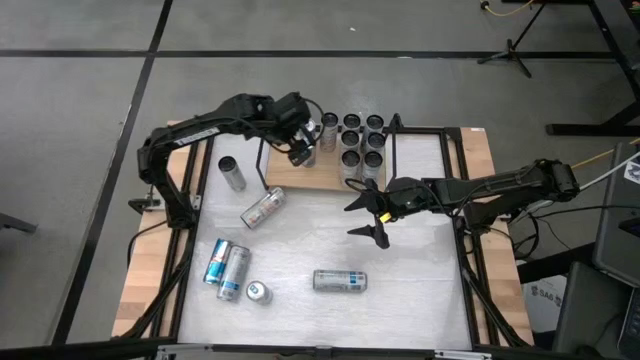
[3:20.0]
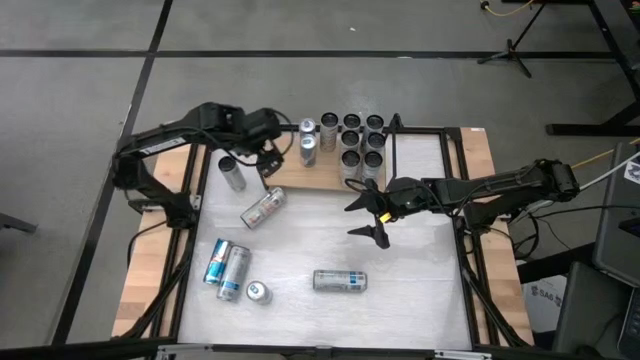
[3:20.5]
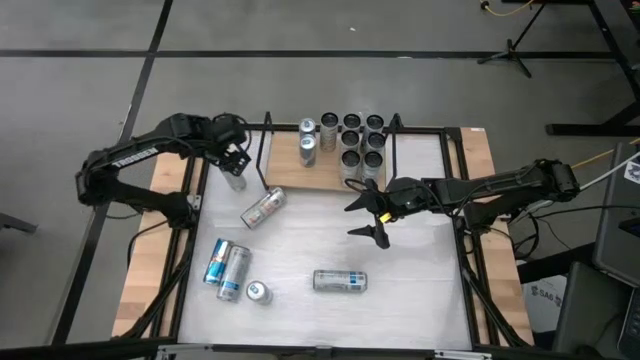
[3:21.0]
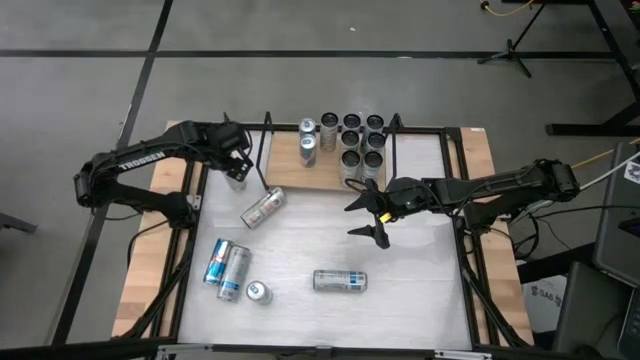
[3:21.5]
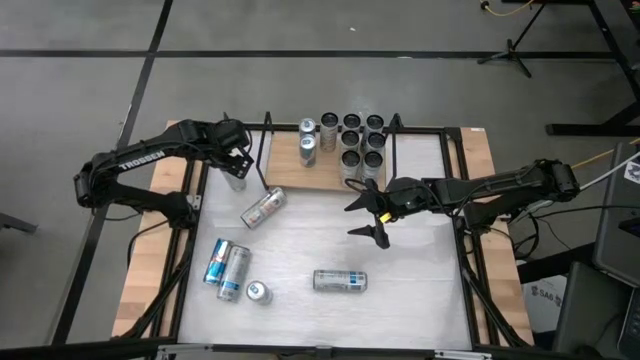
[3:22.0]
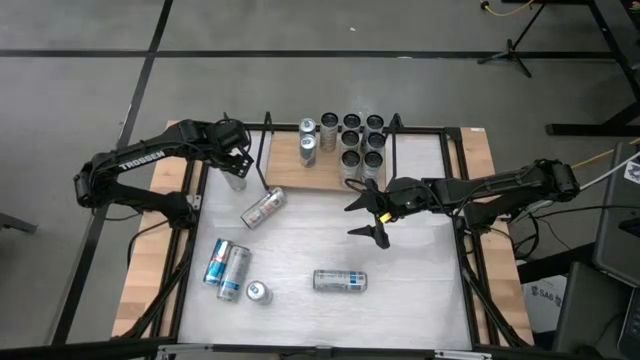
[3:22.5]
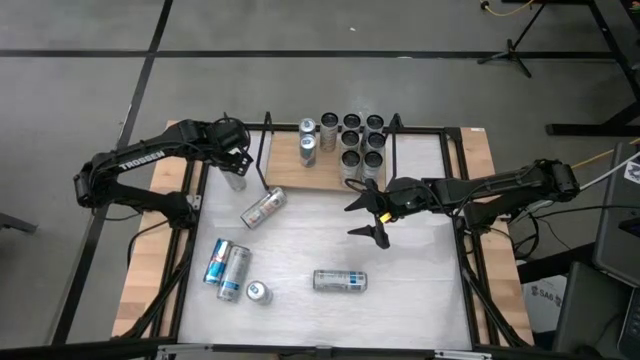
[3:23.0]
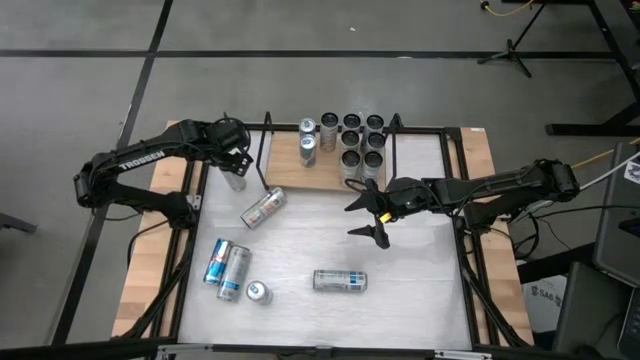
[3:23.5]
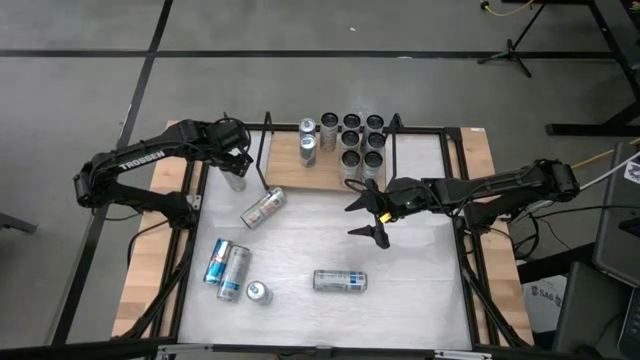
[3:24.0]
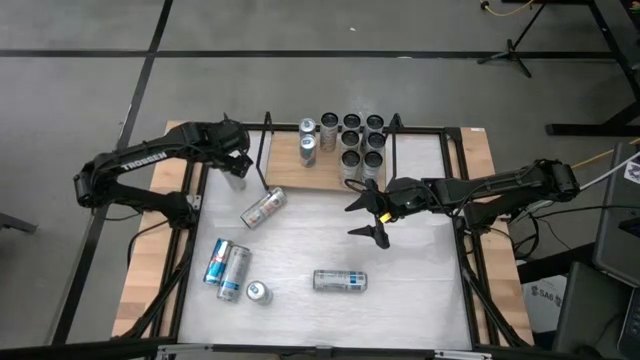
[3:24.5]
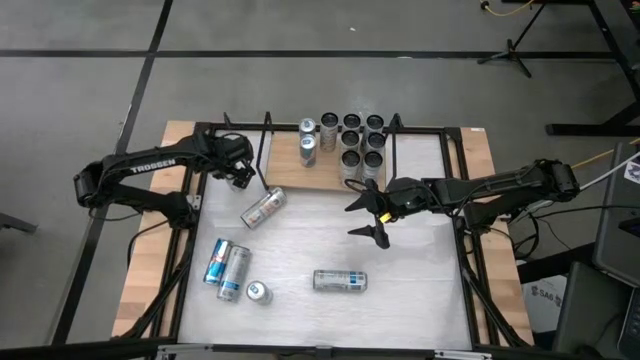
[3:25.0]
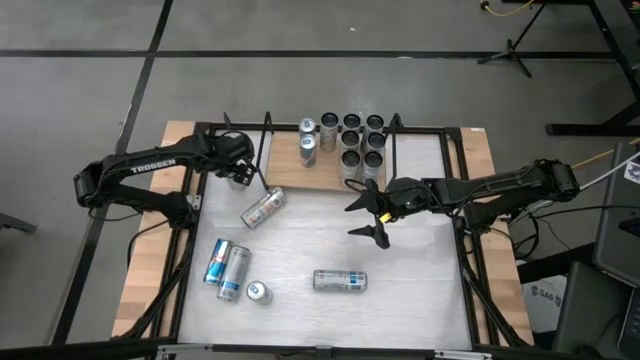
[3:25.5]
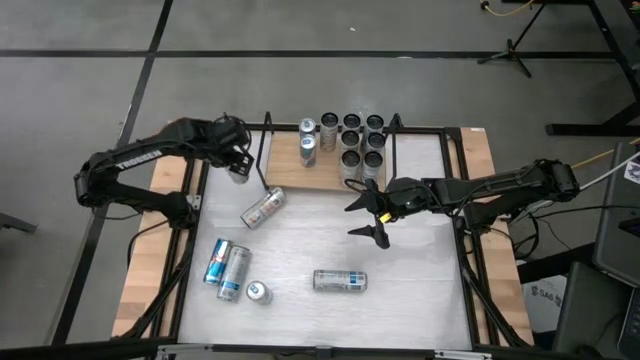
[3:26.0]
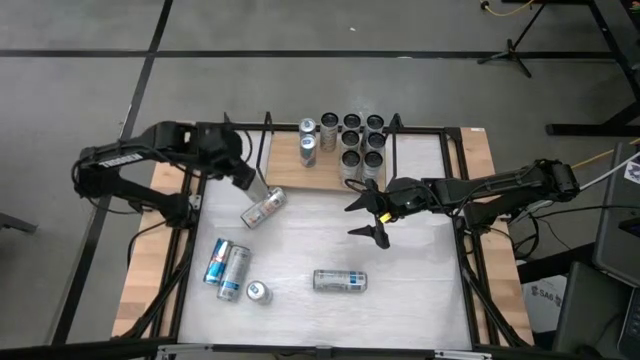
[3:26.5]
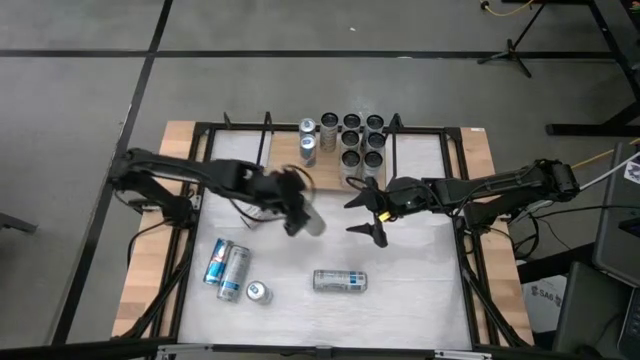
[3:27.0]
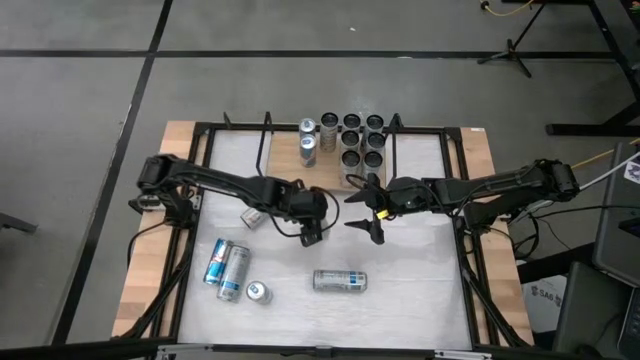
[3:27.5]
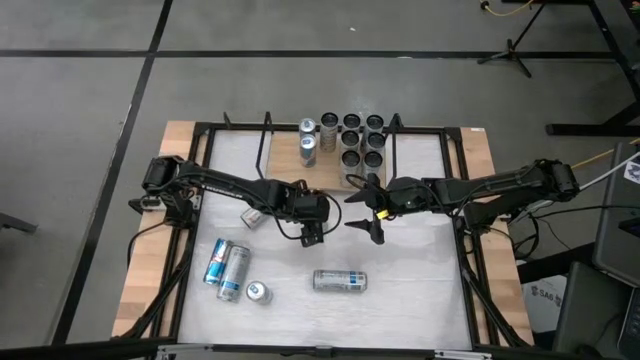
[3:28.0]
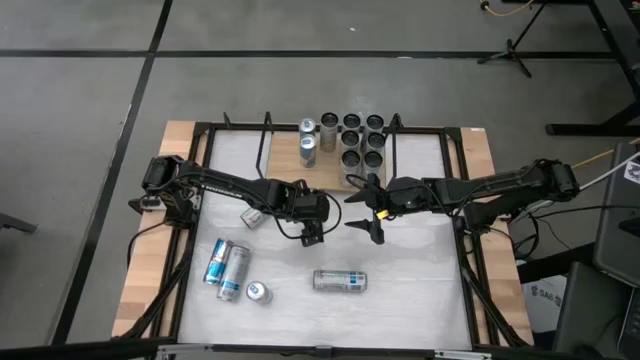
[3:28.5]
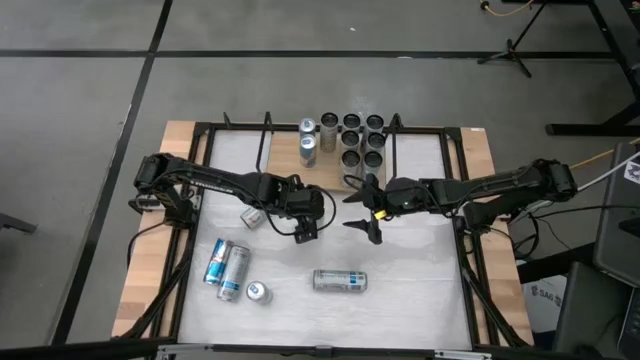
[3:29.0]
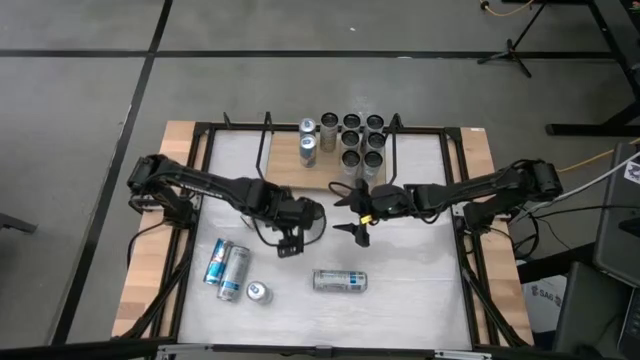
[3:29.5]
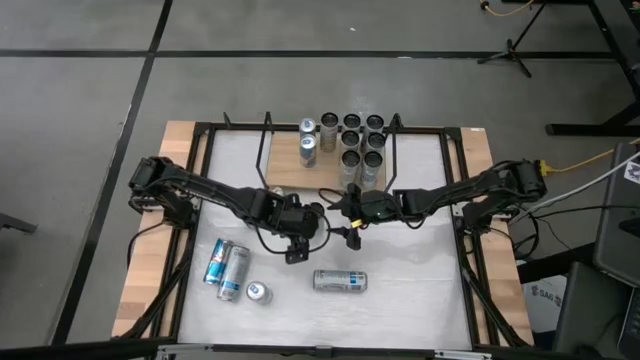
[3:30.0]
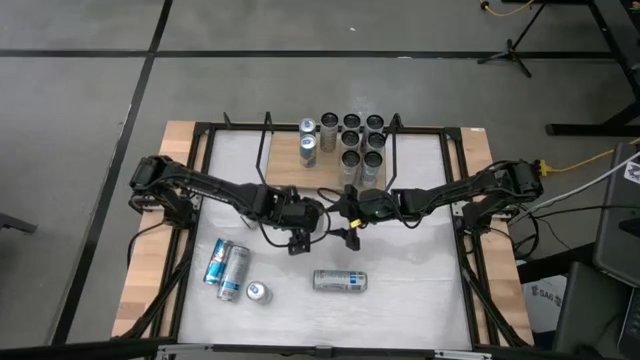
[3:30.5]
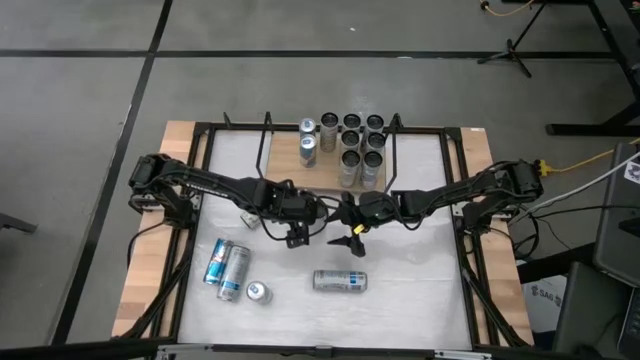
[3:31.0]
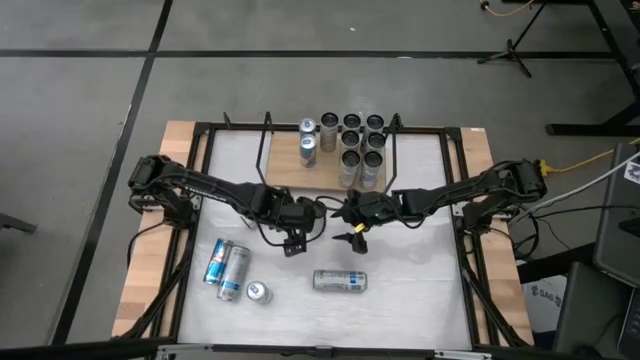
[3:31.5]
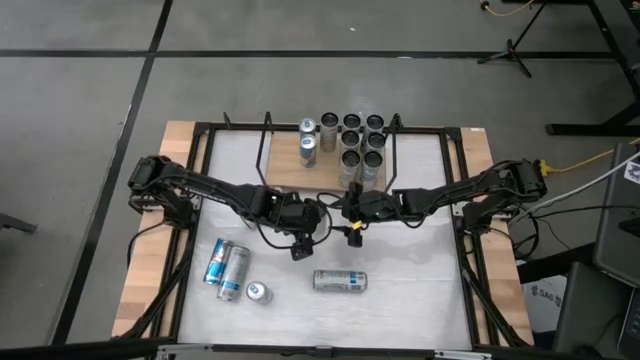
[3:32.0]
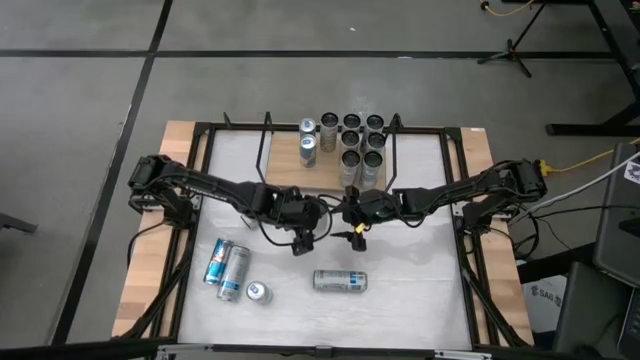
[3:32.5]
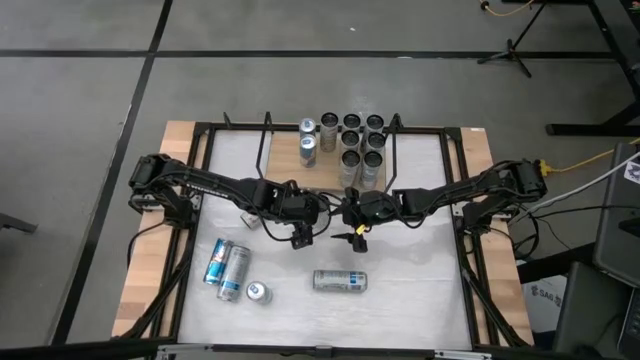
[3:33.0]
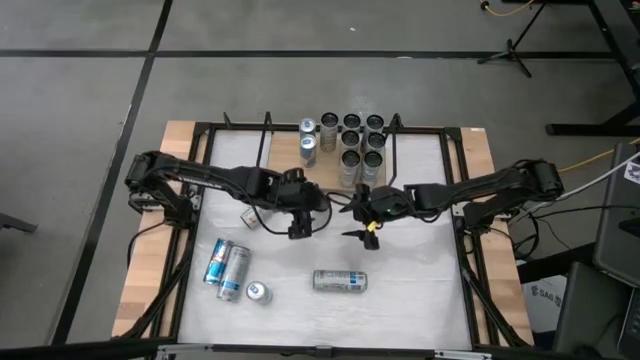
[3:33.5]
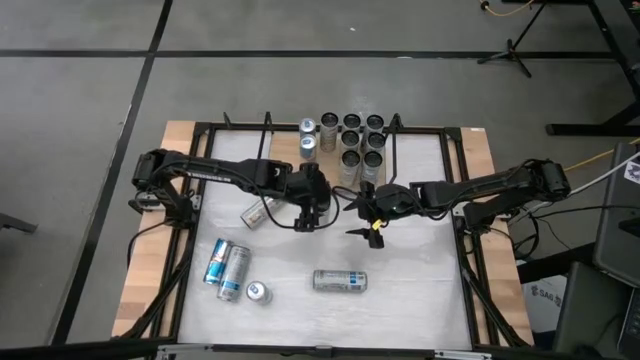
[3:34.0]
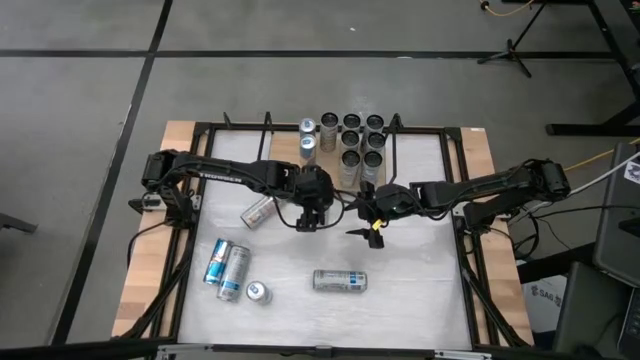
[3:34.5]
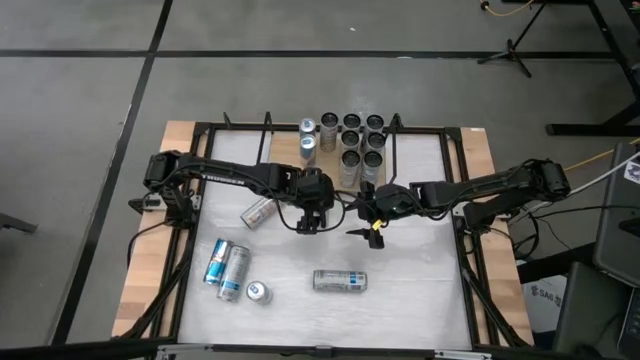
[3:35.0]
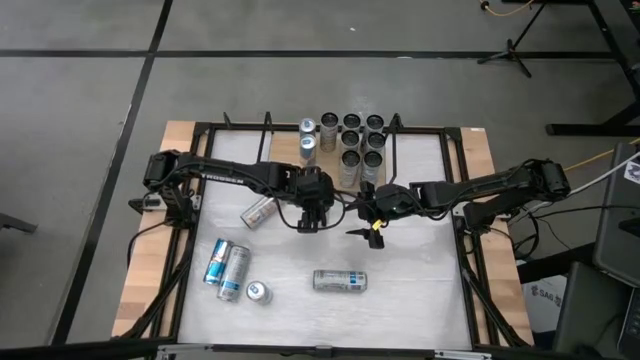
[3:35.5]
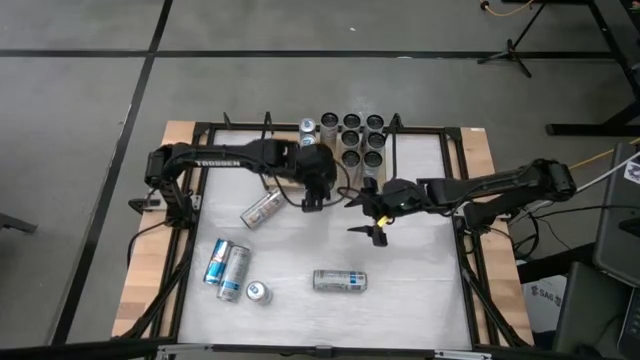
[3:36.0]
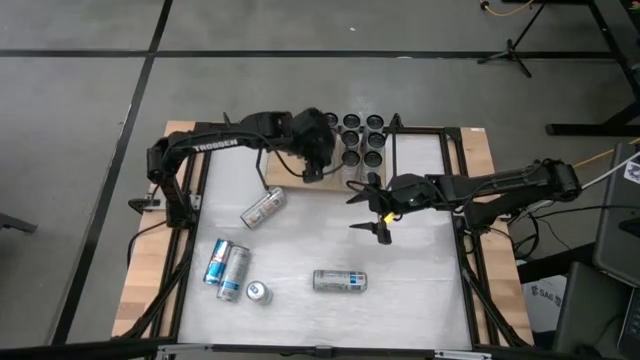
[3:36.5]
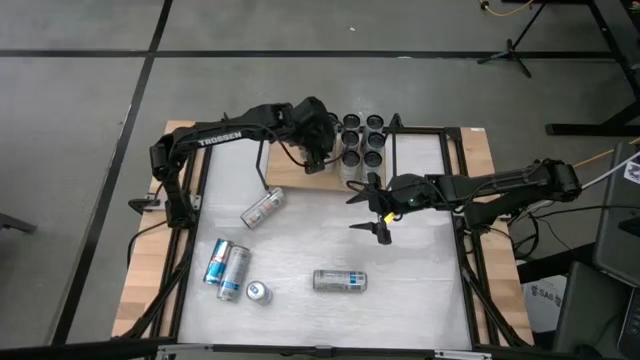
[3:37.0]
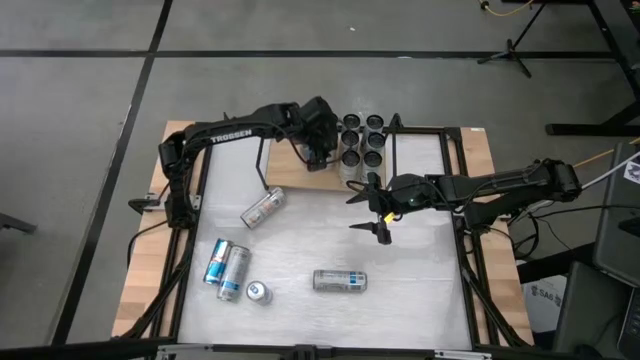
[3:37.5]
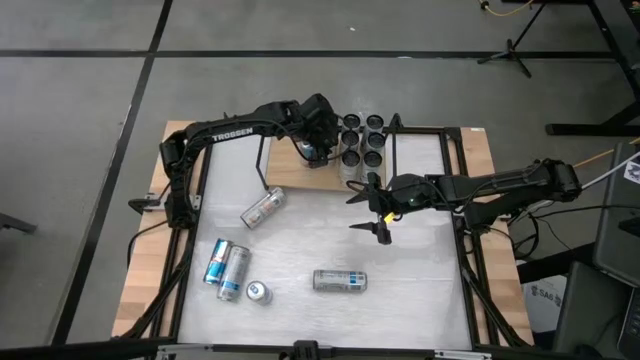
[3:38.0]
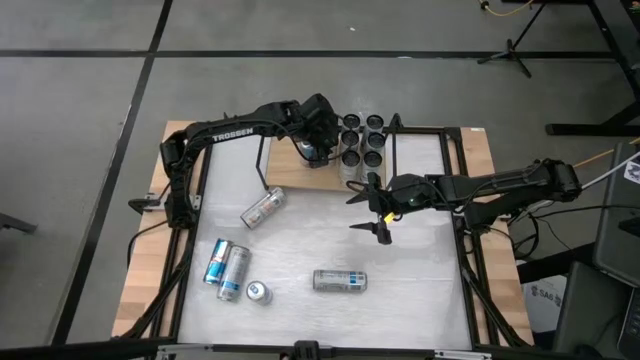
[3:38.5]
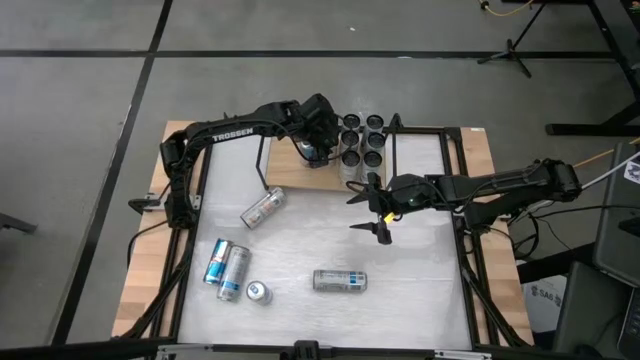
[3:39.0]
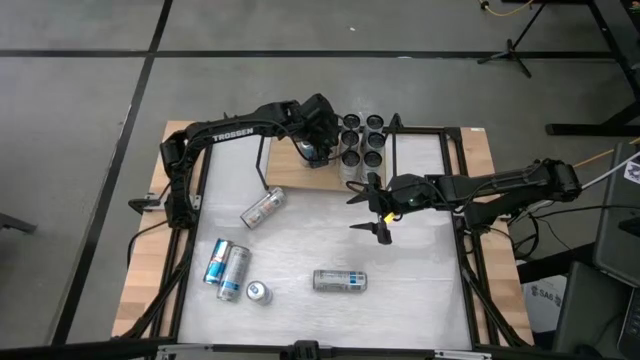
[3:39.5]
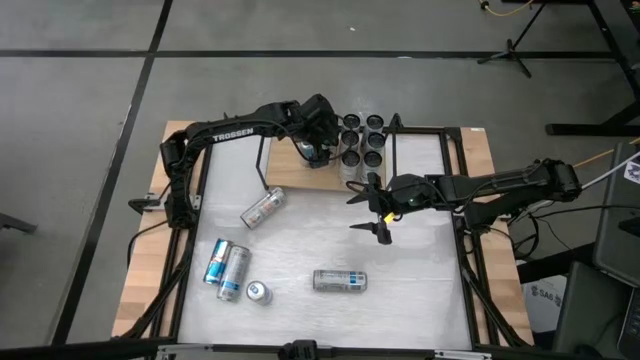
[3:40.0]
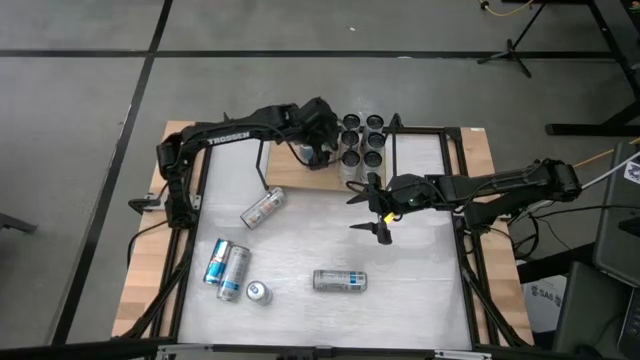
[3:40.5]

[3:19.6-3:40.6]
Task: Place canned beverage on shelf
Put the white soda can aligned with the other white soda can on the shelf

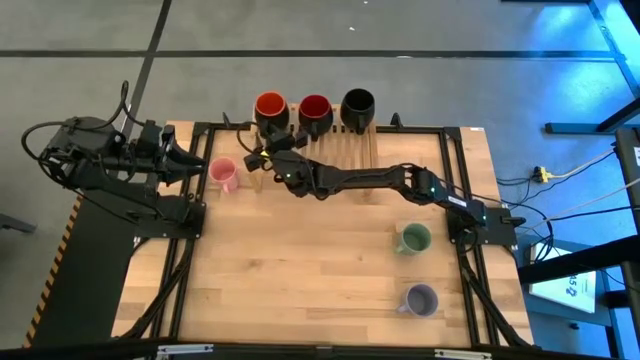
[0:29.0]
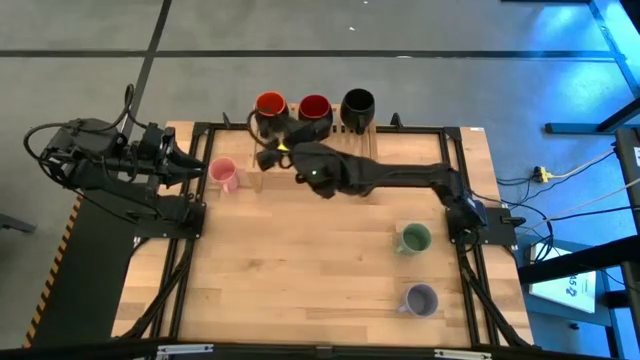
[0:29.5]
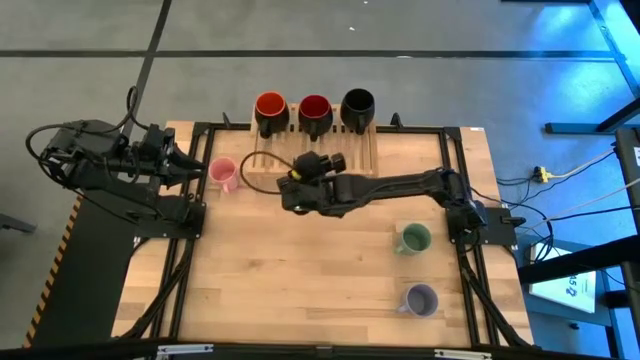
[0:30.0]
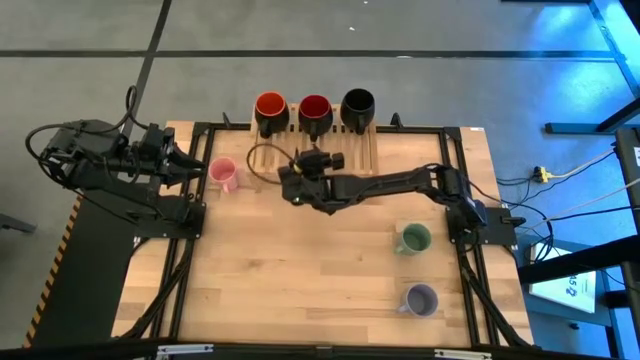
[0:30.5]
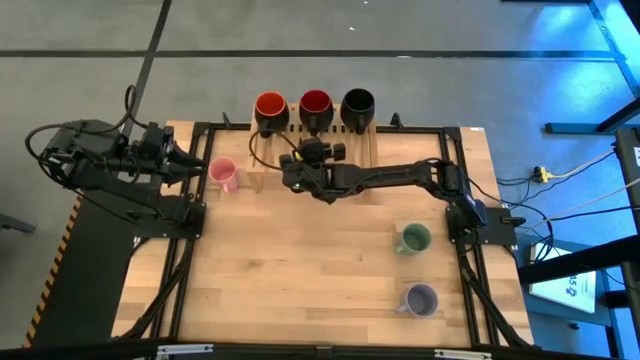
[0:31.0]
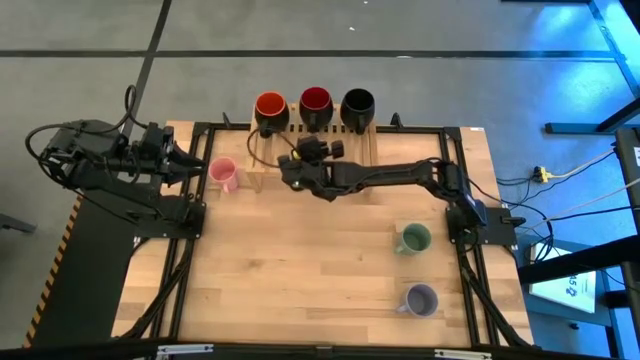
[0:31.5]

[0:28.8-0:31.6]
Task: Place coffee mugs
Adjust the red black mug on the shelf
